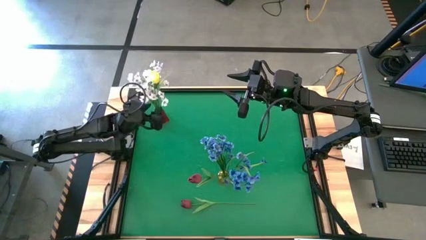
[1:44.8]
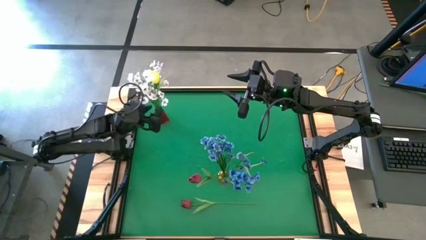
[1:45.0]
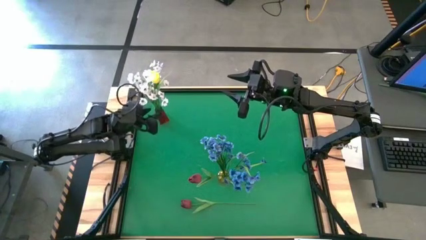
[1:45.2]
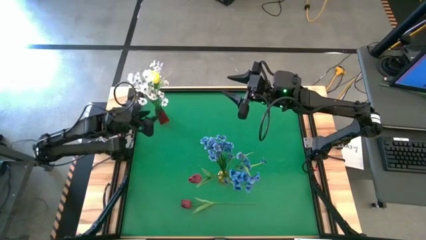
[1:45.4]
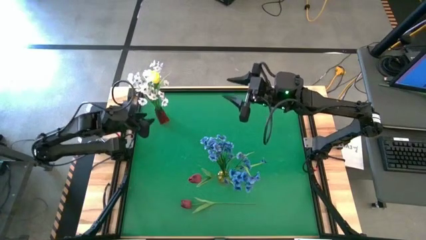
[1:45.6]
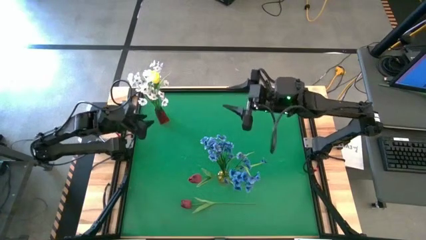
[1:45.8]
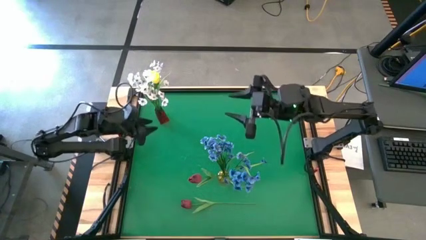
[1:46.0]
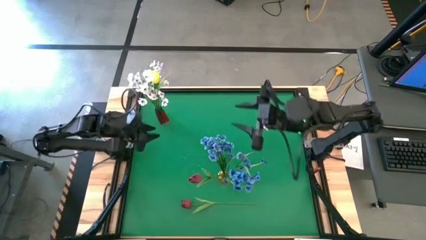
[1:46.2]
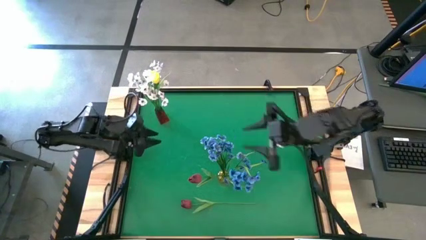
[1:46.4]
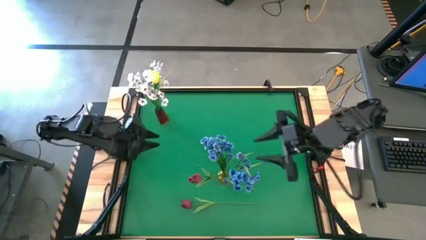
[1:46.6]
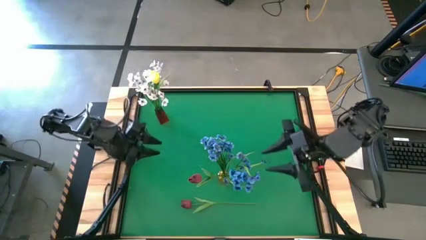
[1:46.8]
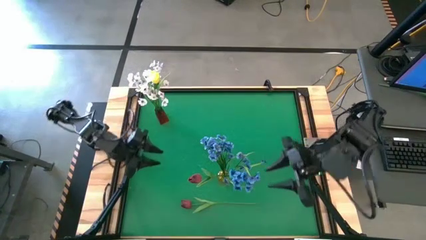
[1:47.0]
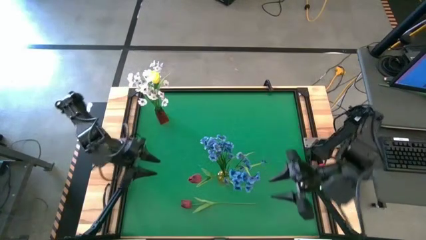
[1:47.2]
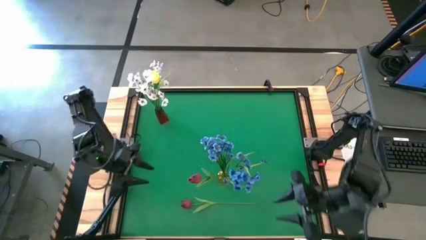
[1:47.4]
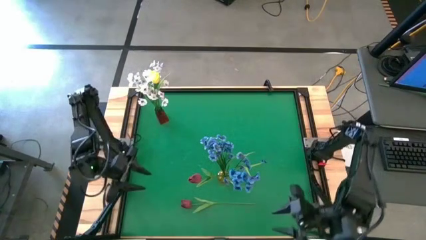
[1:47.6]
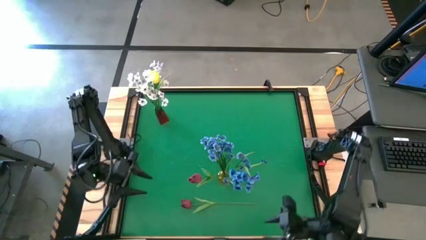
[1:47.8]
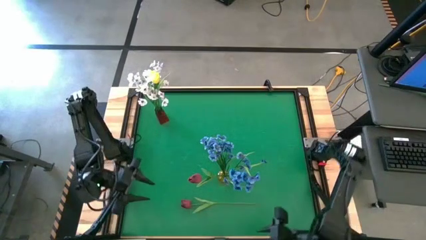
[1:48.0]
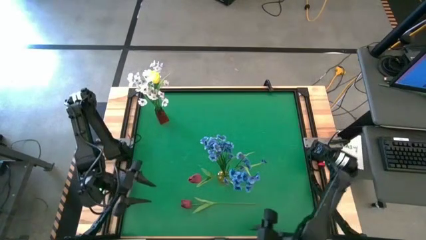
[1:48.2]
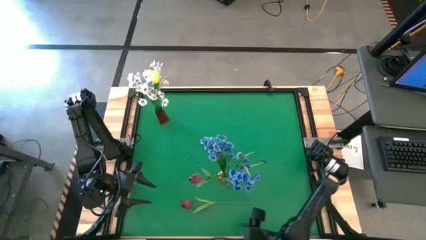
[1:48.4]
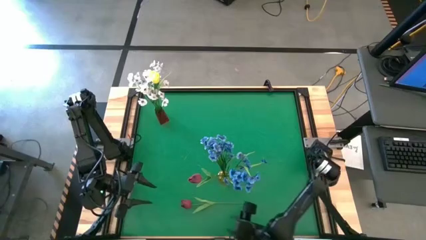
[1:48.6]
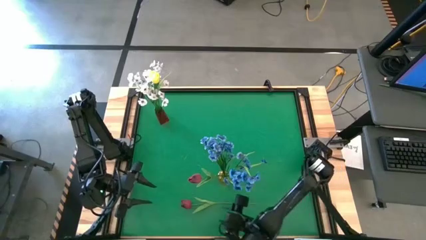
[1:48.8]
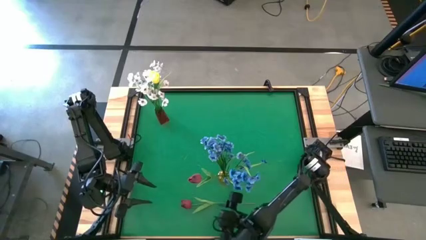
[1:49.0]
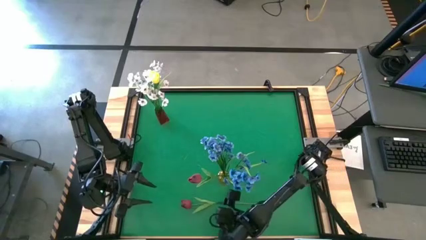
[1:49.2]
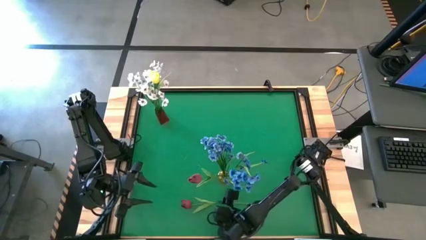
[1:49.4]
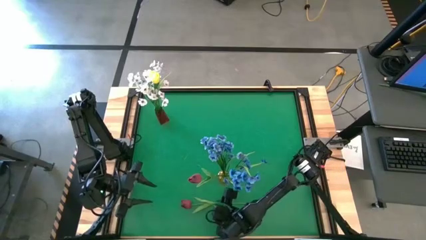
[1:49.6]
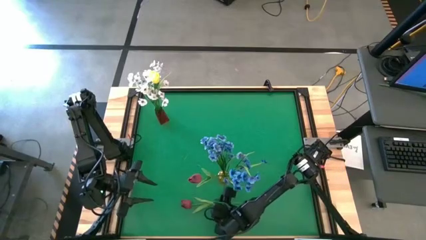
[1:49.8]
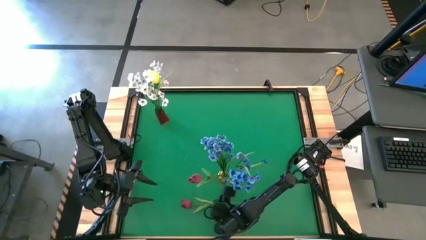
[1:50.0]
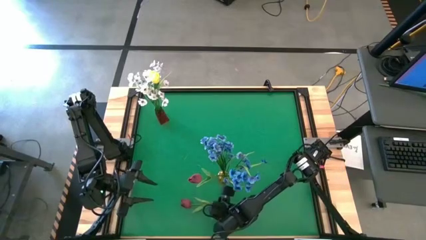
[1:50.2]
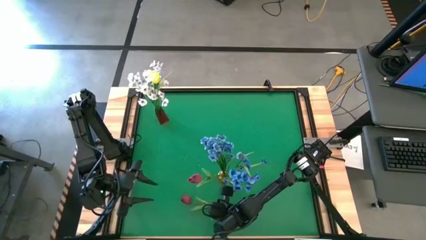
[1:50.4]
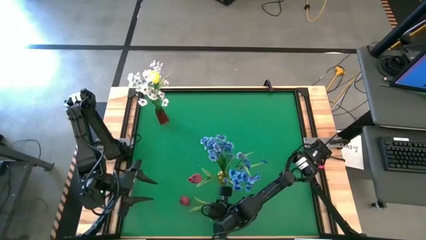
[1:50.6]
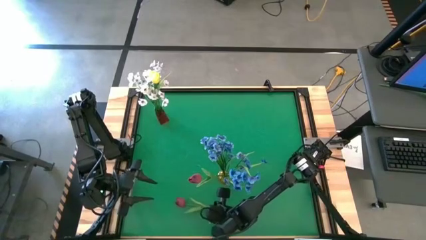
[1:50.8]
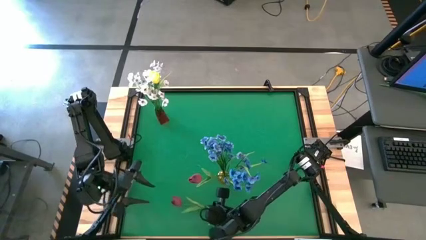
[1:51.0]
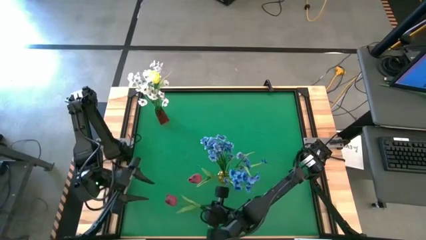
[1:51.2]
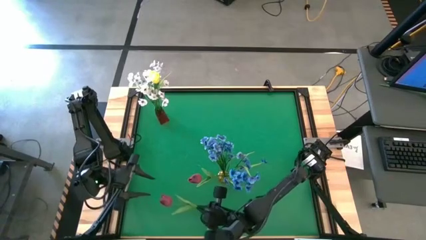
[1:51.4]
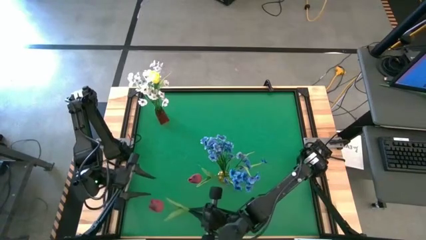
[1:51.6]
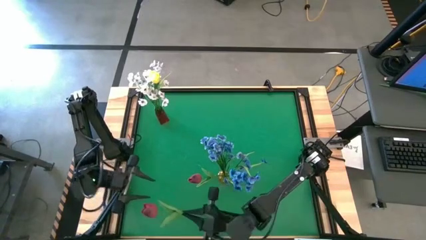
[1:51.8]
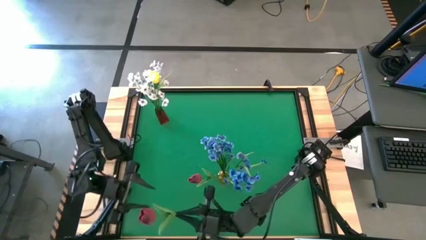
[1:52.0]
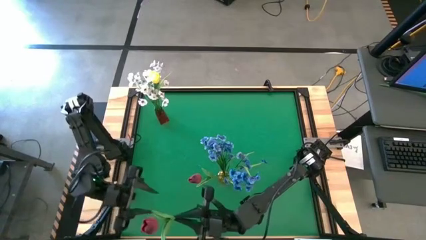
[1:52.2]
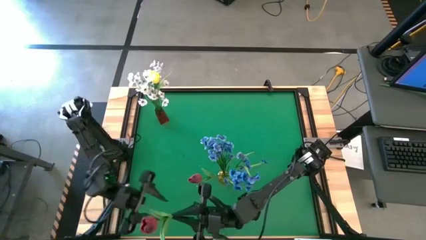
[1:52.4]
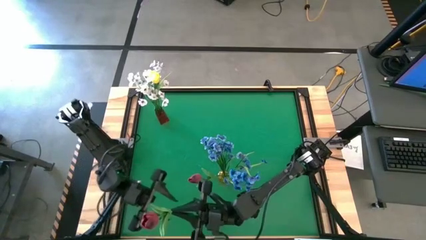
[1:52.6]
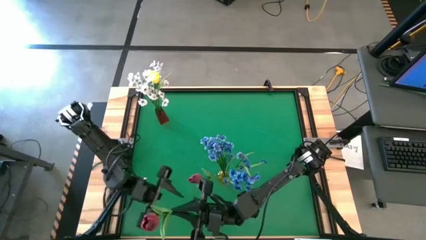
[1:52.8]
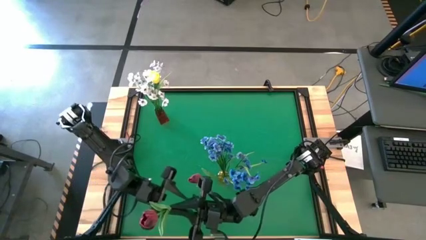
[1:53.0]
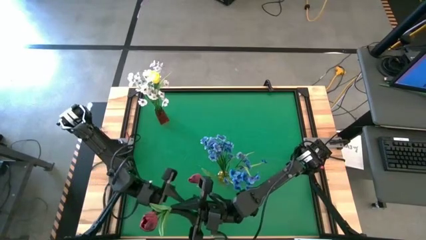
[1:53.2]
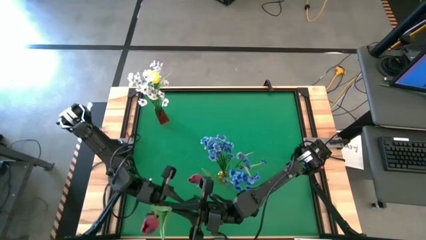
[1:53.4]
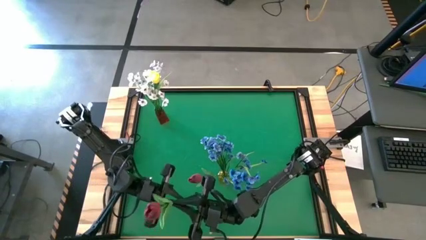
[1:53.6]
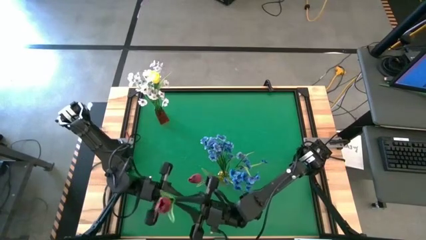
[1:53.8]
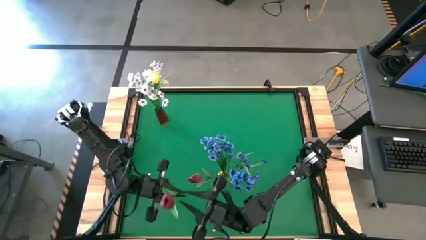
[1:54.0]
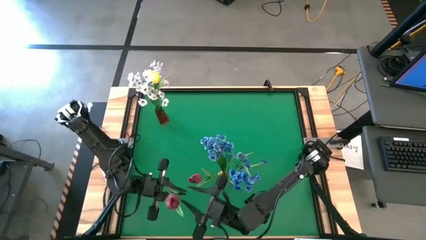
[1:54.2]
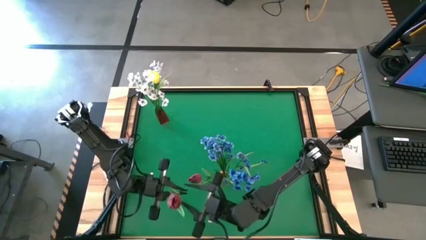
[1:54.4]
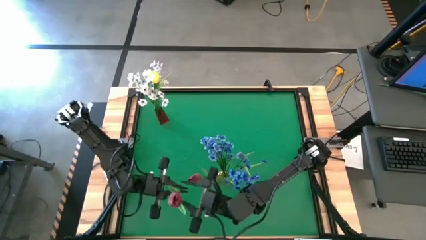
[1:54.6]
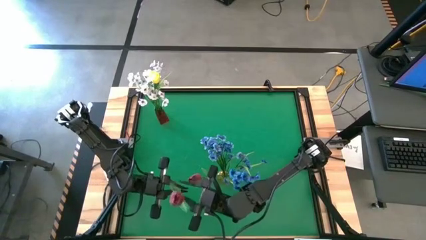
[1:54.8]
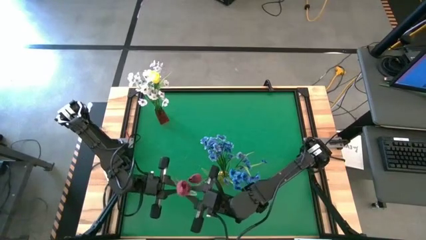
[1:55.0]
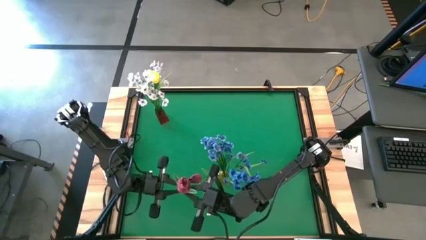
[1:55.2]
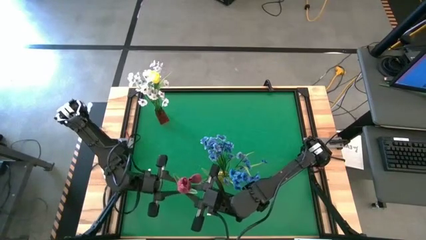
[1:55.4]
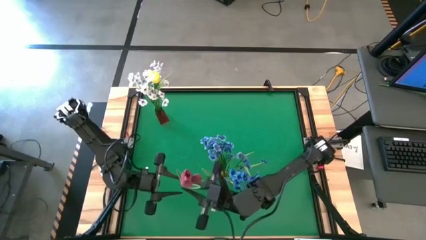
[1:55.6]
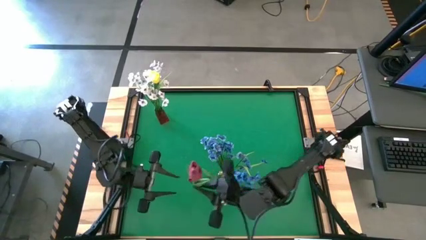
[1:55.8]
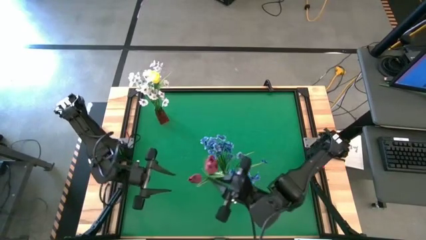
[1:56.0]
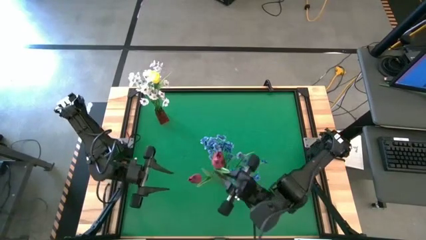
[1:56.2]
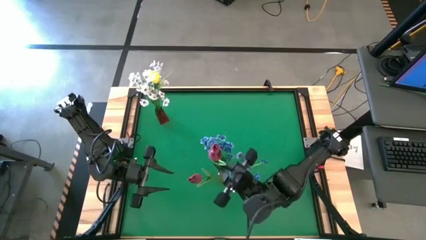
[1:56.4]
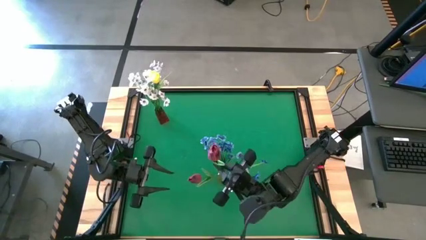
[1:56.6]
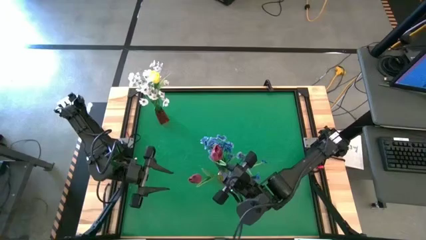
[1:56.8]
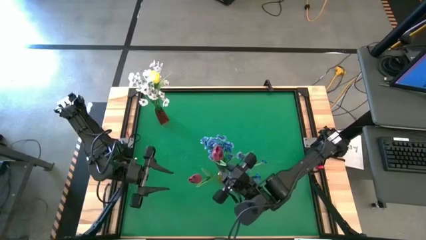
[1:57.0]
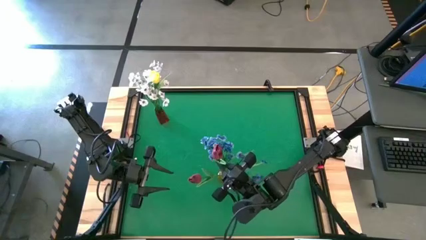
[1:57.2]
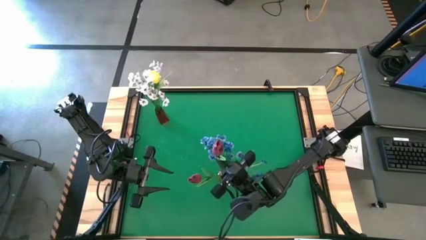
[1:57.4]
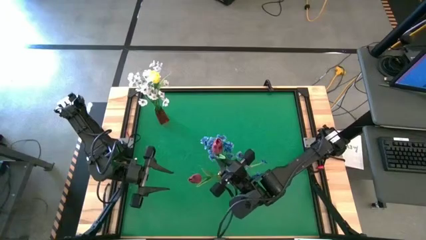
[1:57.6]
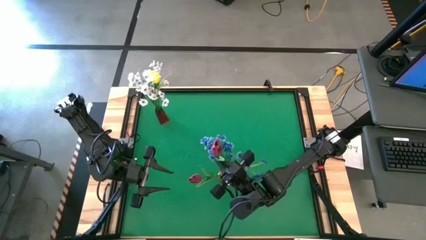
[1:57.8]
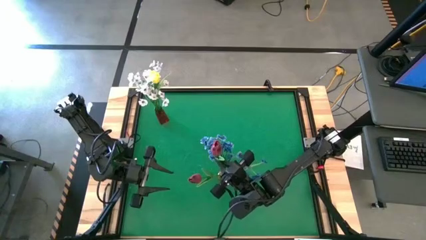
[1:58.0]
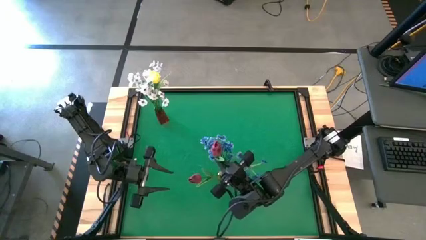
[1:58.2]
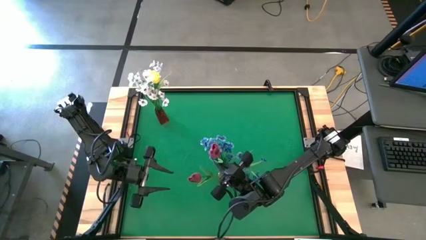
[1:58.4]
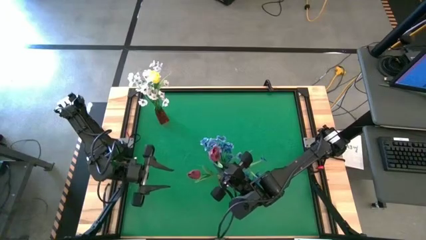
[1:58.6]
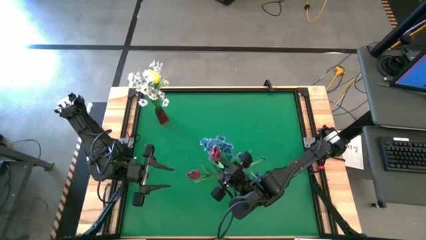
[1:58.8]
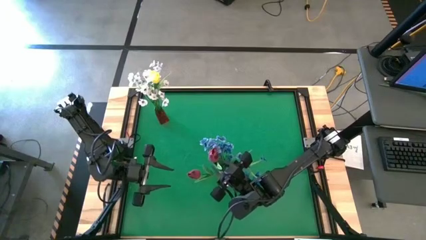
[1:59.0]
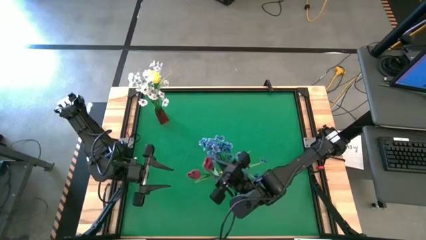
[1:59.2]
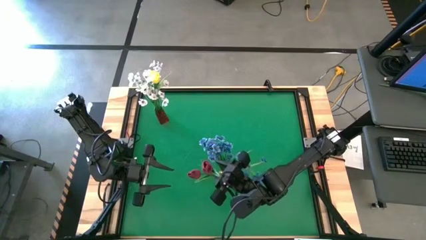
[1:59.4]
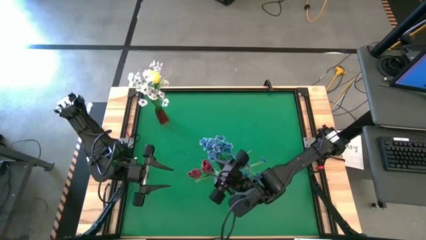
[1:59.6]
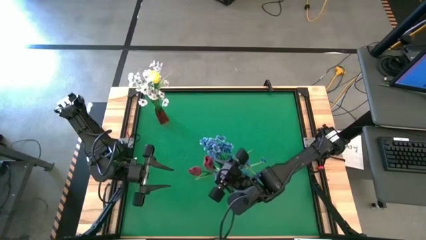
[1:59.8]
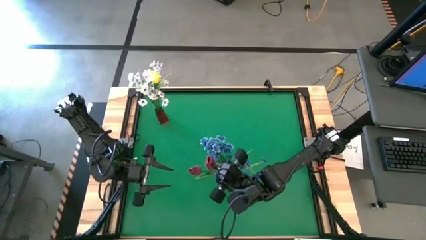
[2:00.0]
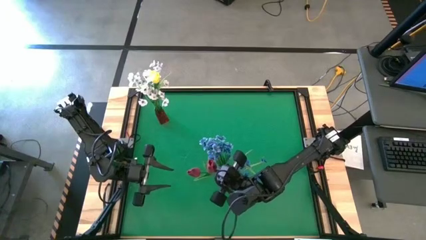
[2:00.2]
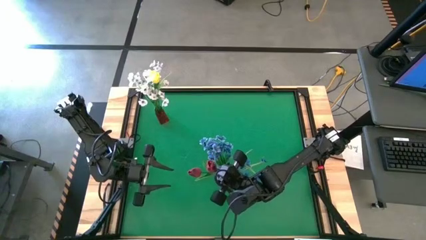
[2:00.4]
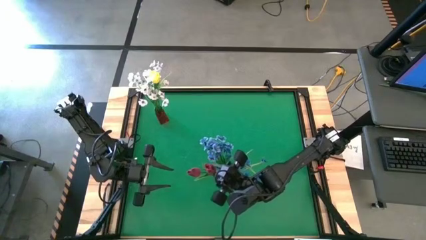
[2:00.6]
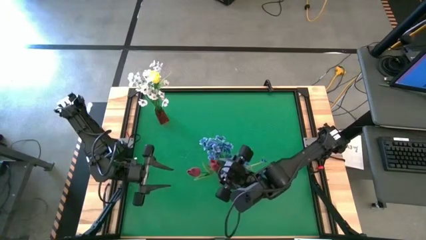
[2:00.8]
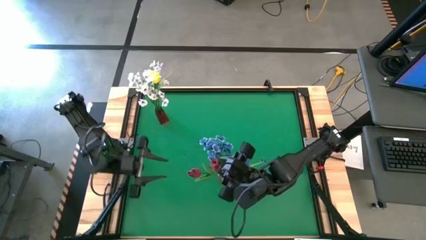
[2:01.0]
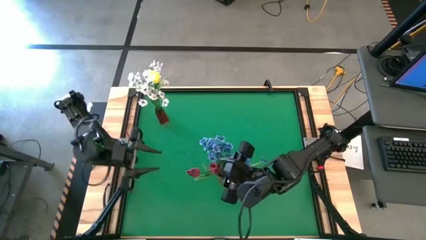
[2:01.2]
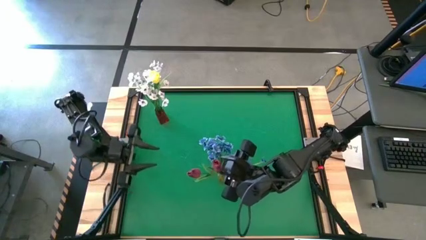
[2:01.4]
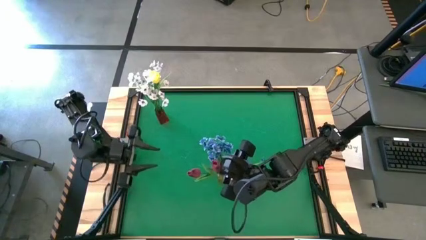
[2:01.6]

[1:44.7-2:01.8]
Task: Sort flowers into vase by color
Put the red flower into the yellow vase
